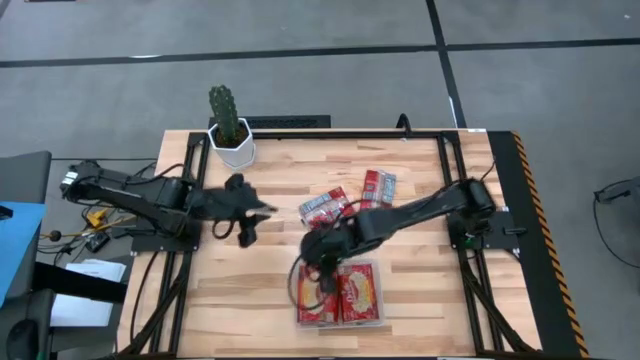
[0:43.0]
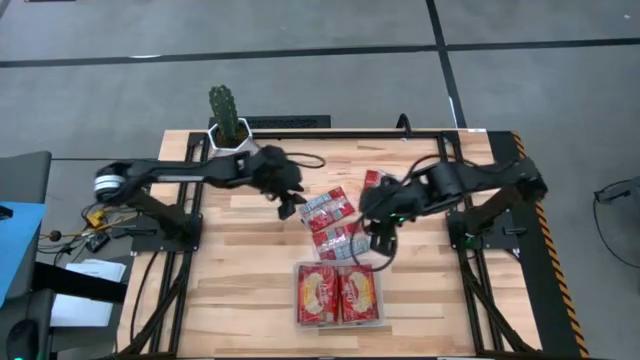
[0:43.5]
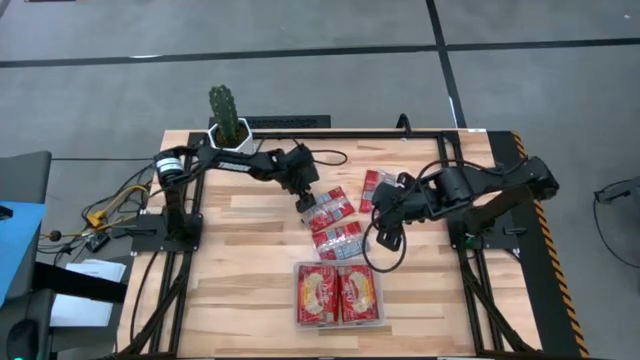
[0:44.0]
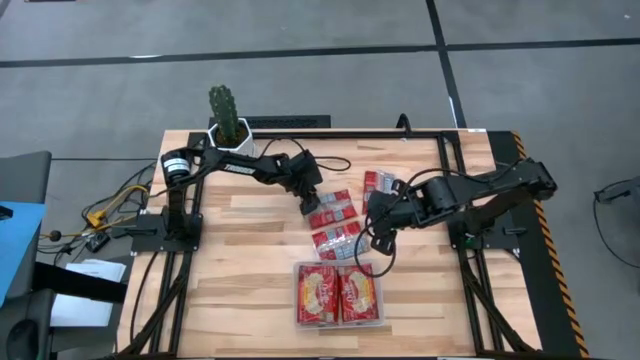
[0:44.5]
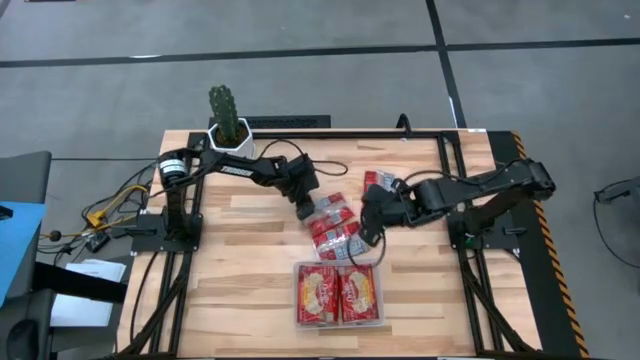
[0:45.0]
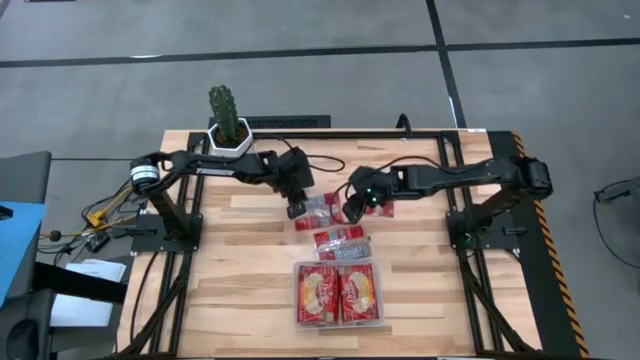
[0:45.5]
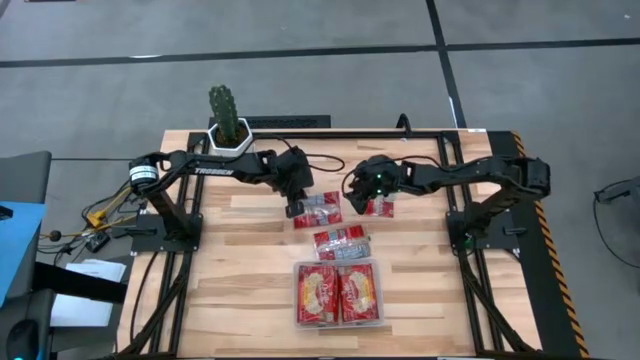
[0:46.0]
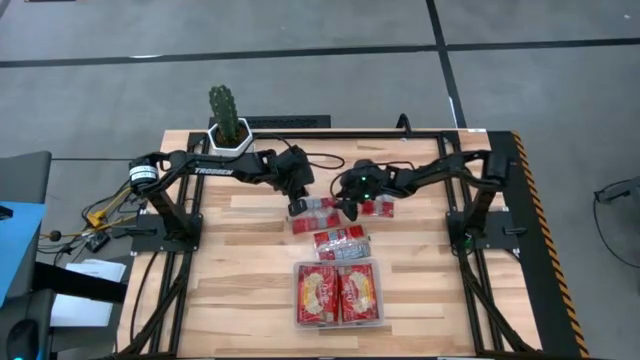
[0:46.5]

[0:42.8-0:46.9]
Task: Sort popcorn bags into baskets
Put the red popcorn bag into the transparent bin

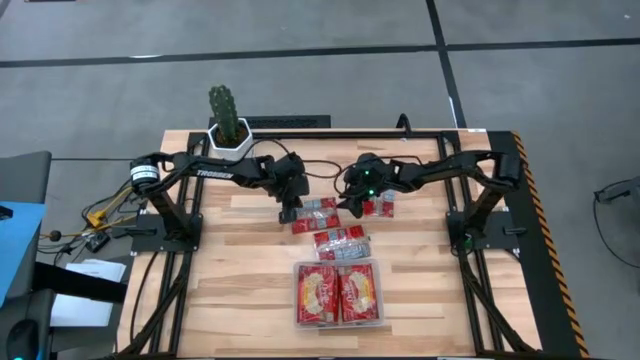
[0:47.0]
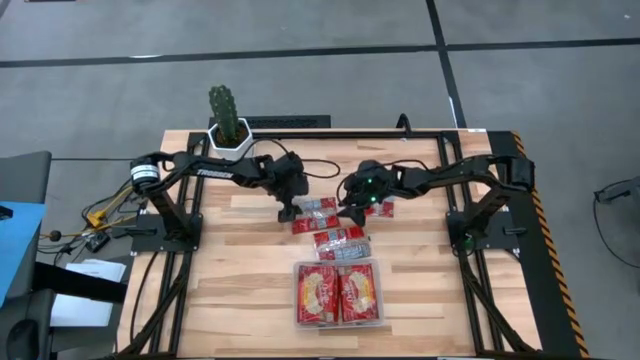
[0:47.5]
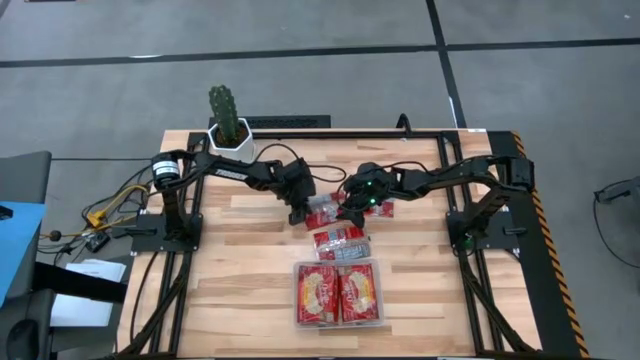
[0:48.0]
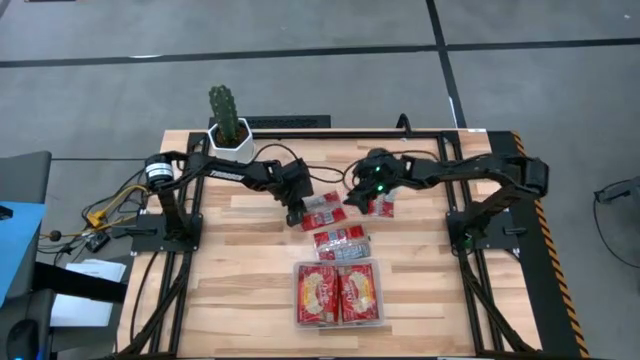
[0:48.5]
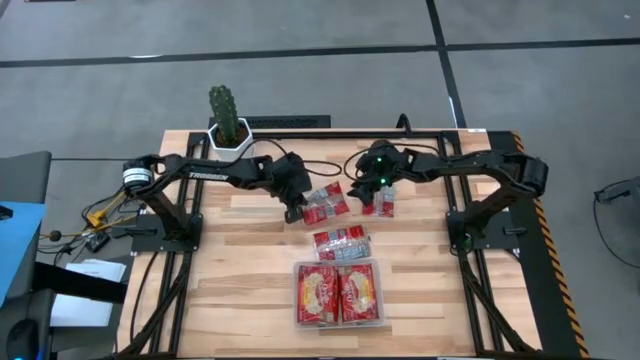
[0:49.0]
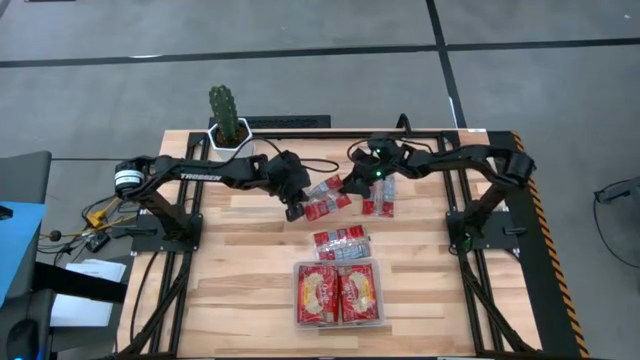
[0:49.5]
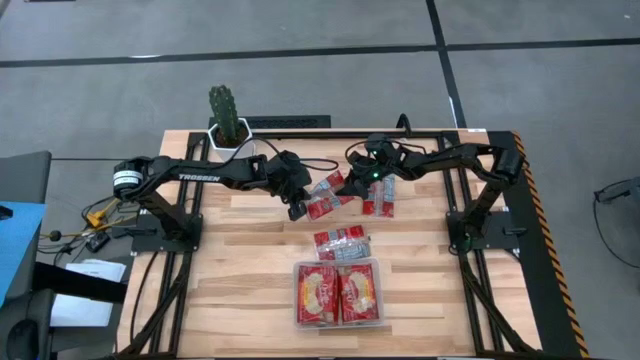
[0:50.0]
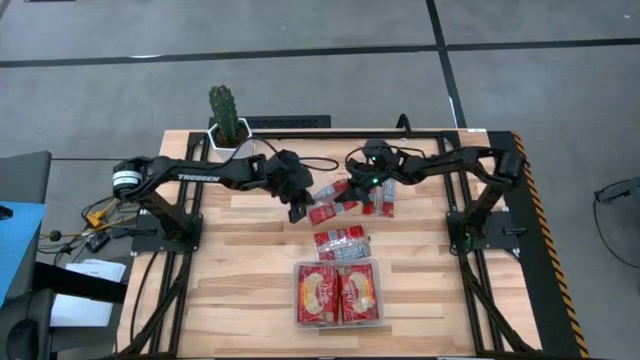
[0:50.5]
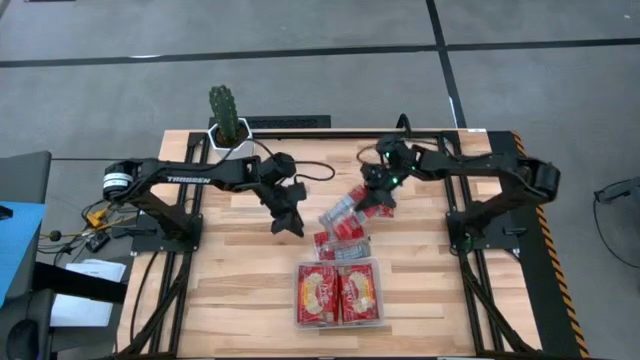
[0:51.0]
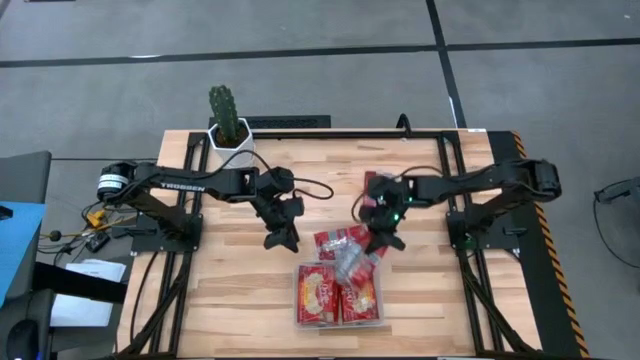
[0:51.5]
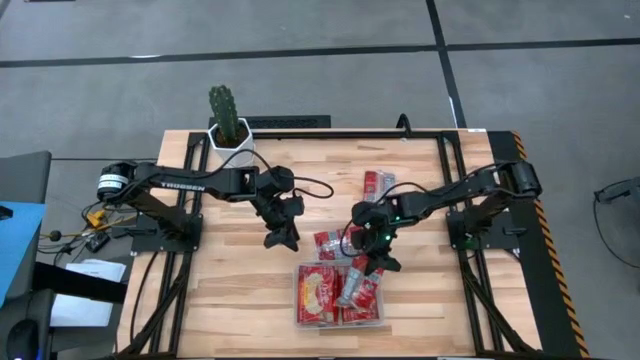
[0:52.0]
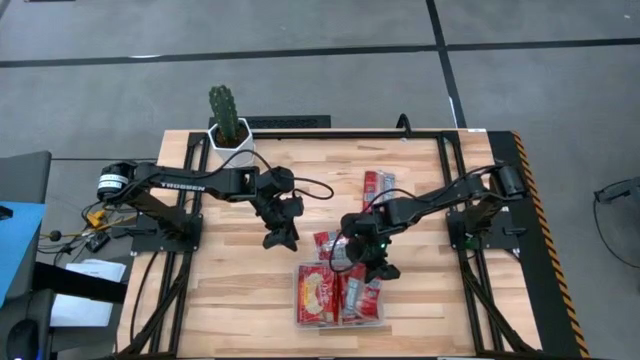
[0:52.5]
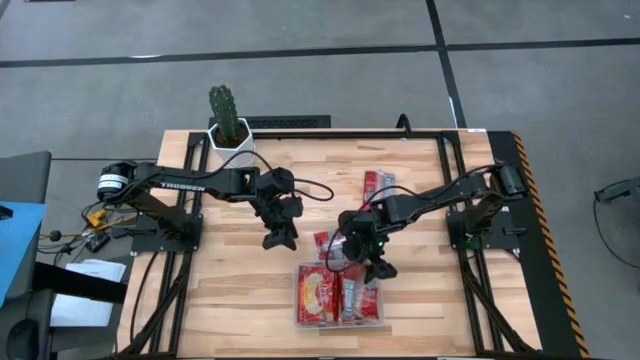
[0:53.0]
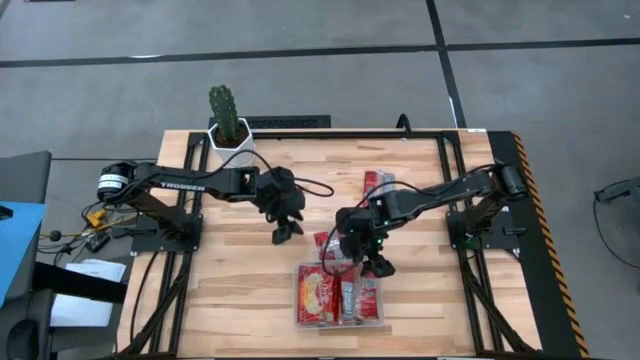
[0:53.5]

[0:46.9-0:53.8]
Put the red popcorn bag into the transparent bin

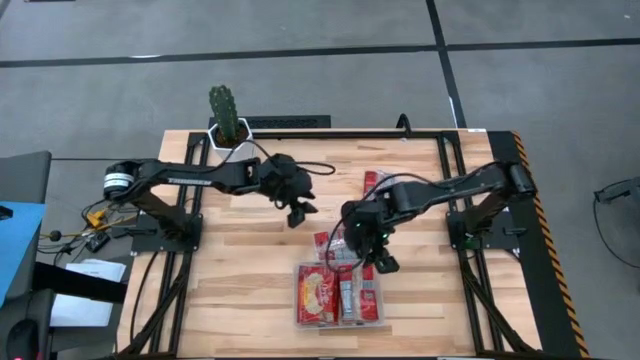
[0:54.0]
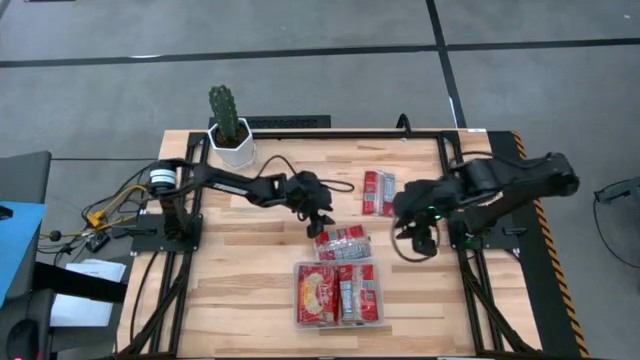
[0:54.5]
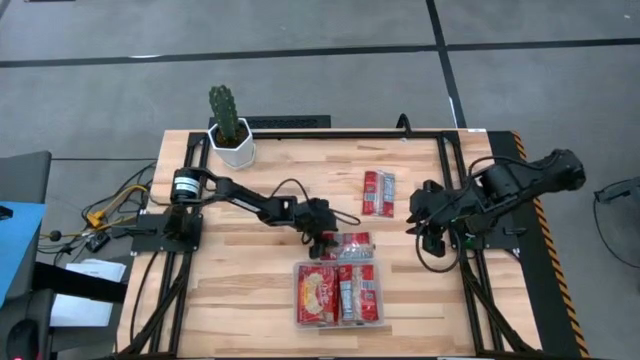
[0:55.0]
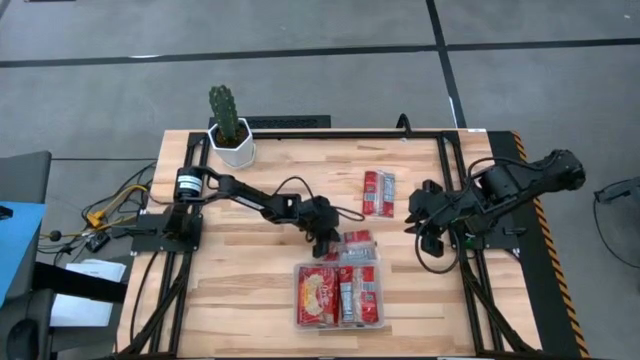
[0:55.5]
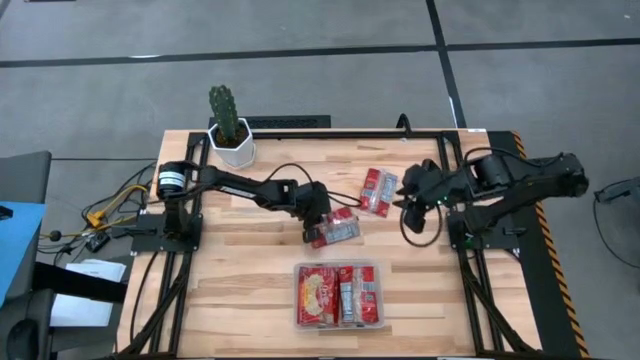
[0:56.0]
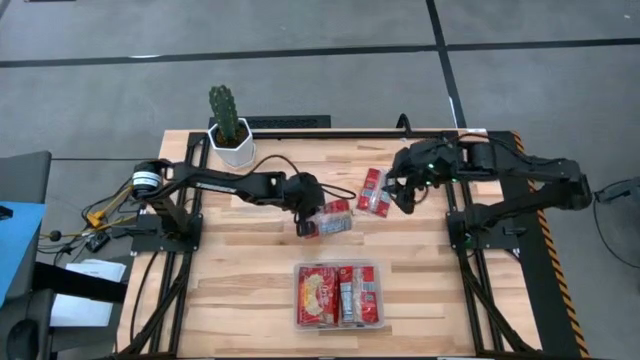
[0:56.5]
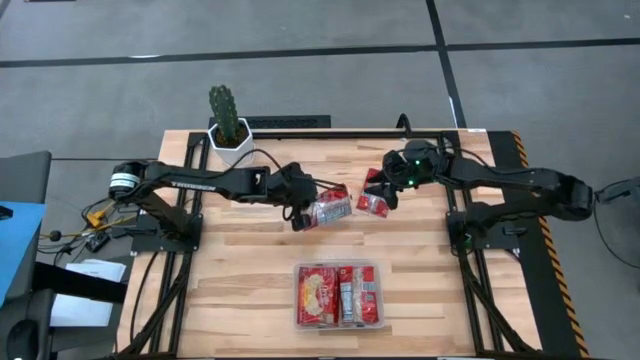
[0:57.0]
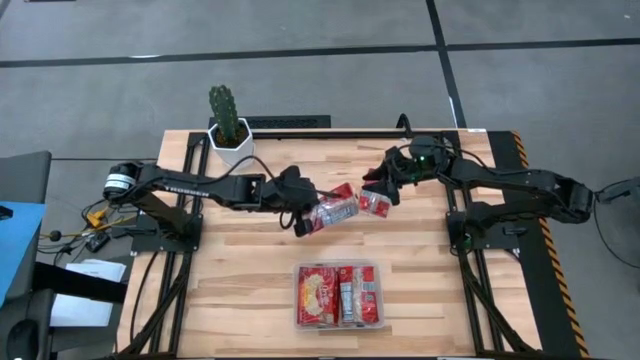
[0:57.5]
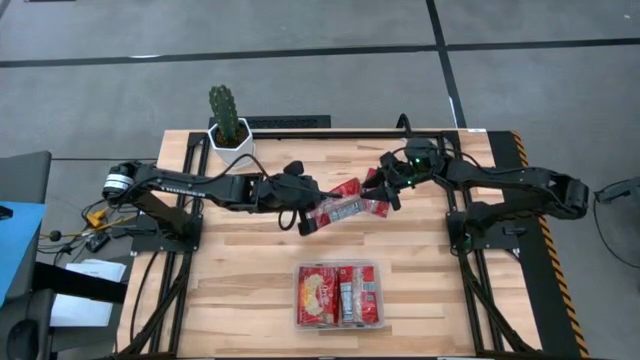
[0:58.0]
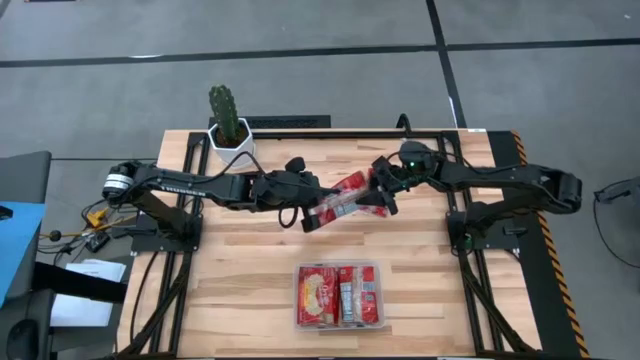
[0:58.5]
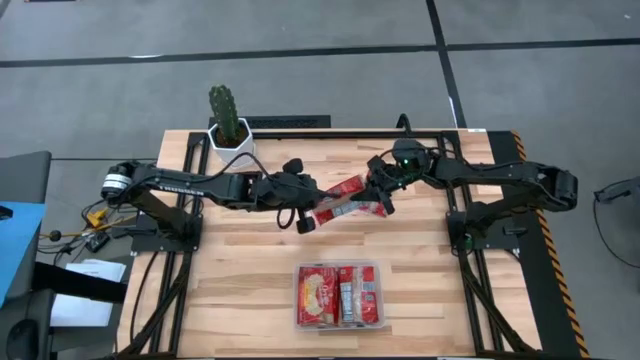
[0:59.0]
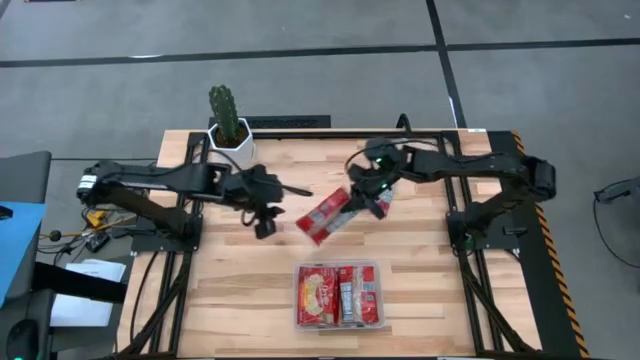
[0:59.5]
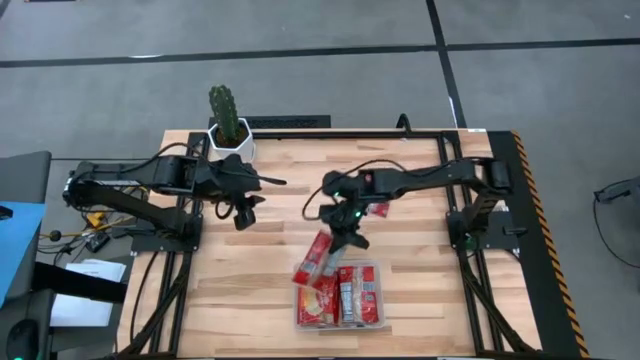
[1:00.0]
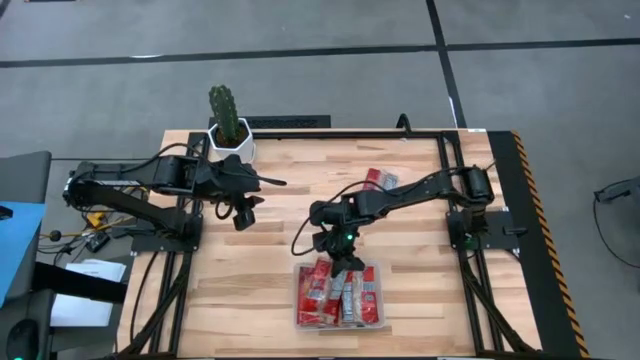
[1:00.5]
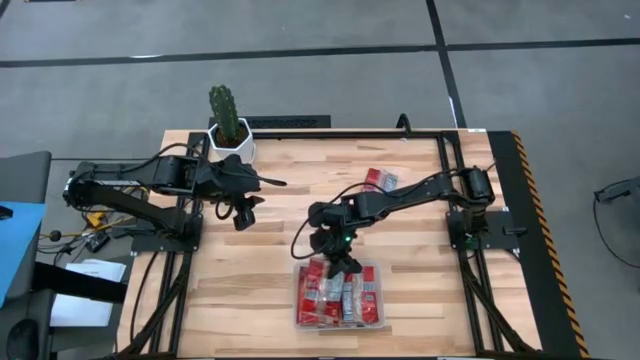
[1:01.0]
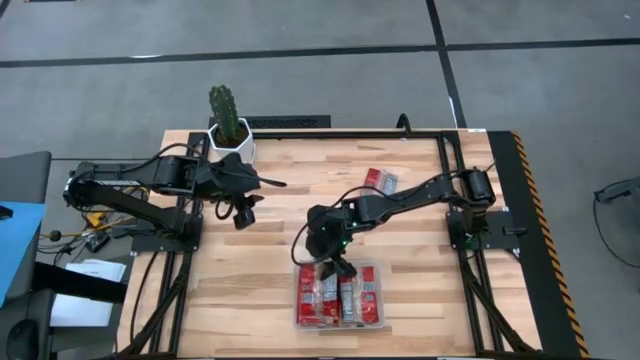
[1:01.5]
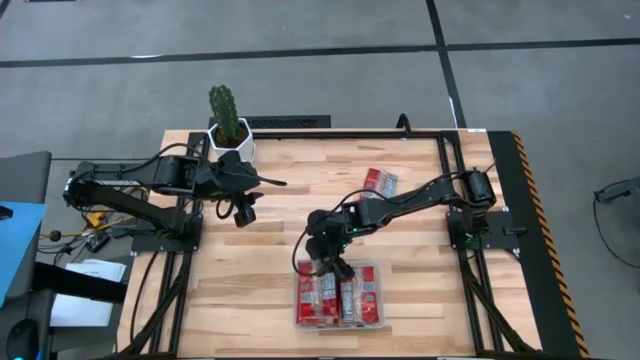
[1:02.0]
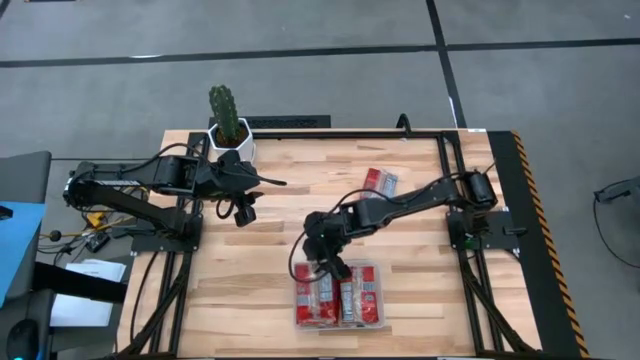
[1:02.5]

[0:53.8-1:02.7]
Put the red popcorn bag into the transparent bin

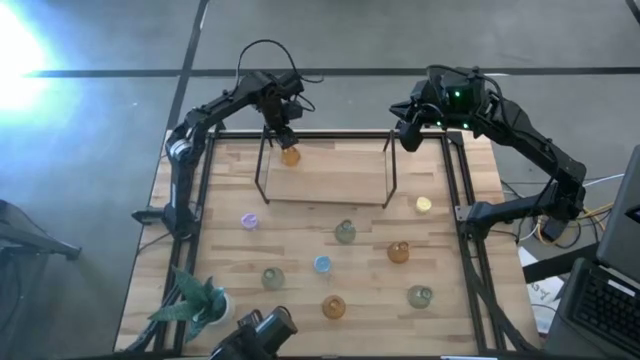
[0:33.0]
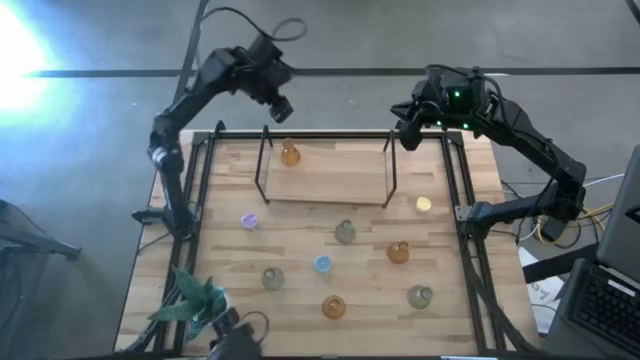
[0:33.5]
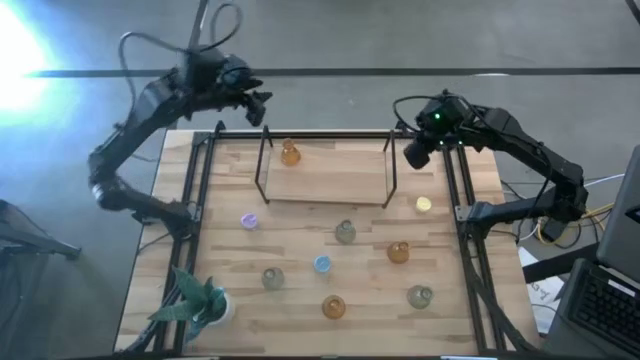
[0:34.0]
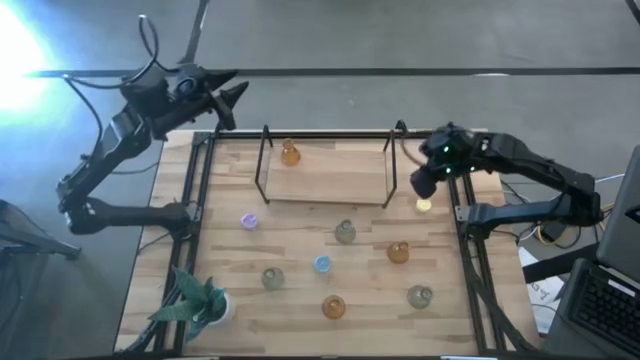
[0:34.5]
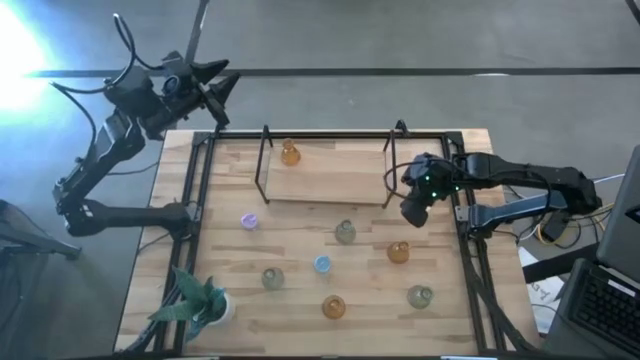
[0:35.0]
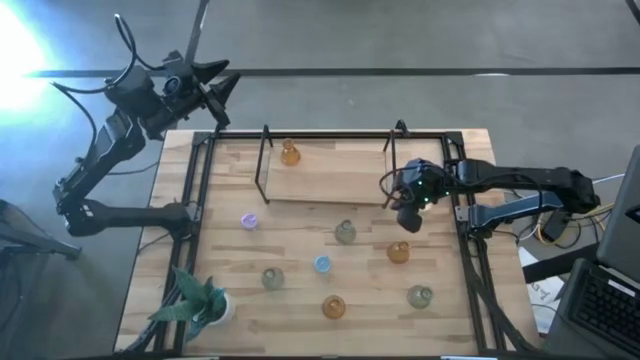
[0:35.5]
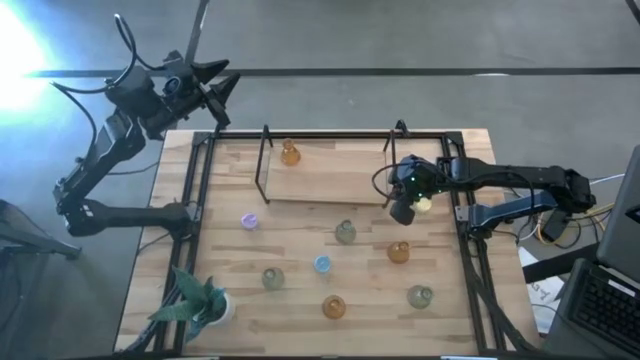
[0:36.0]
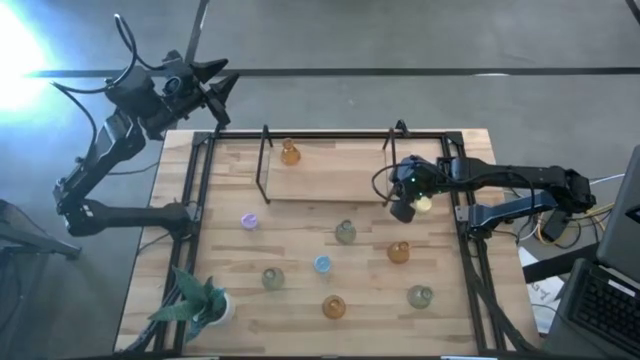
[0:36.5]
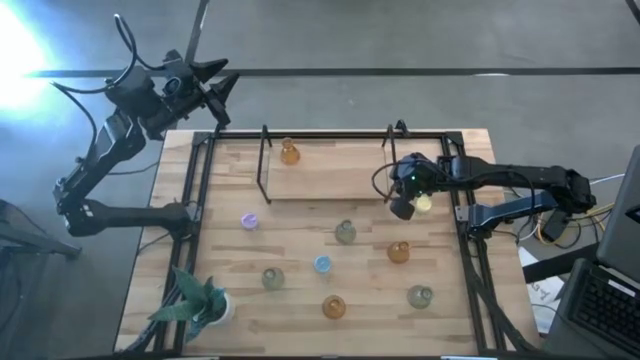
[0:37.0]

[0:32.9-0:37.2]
Task: Pick & Place candle stick holders
Adjust the shelf on the table
